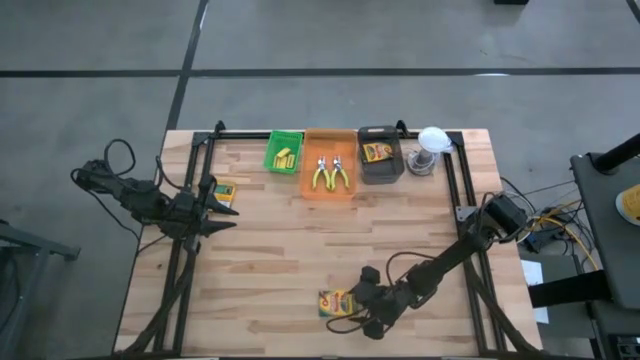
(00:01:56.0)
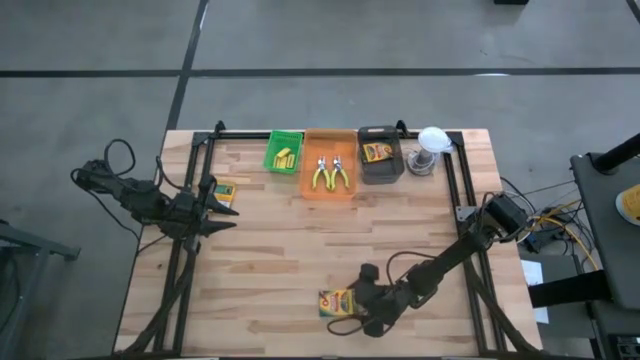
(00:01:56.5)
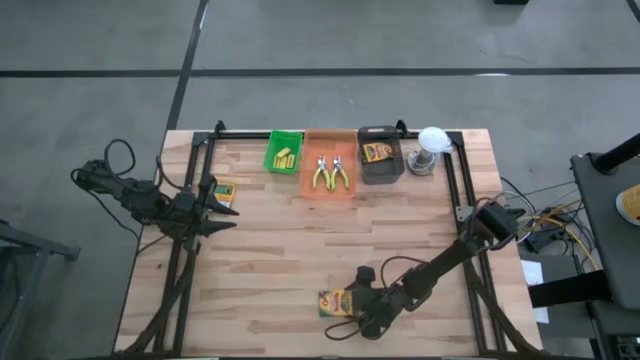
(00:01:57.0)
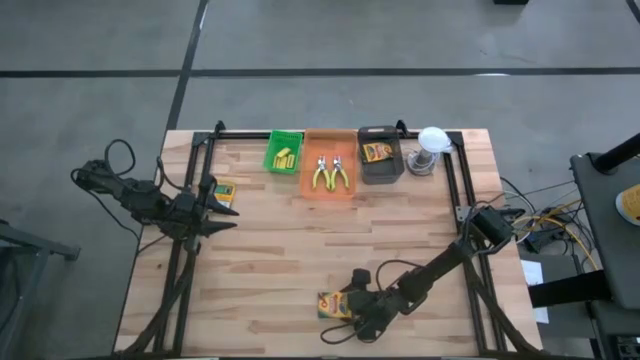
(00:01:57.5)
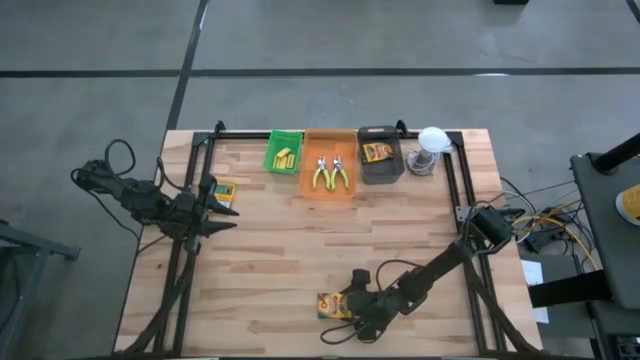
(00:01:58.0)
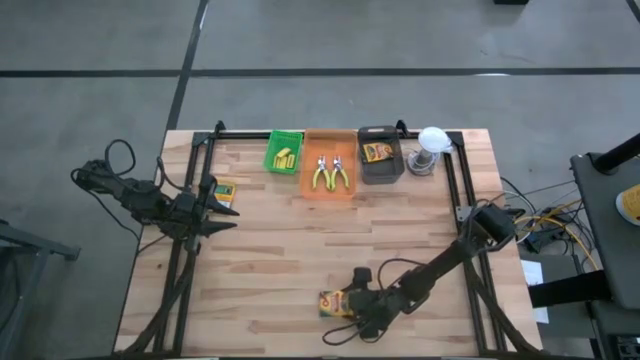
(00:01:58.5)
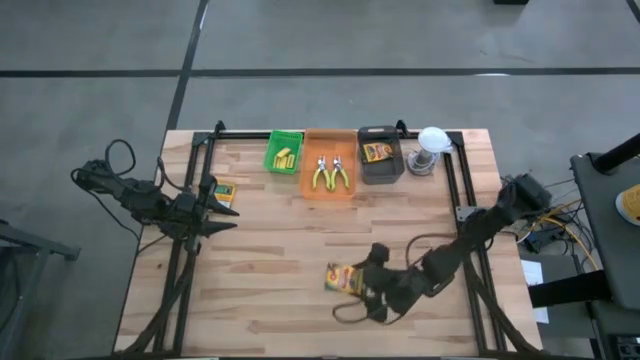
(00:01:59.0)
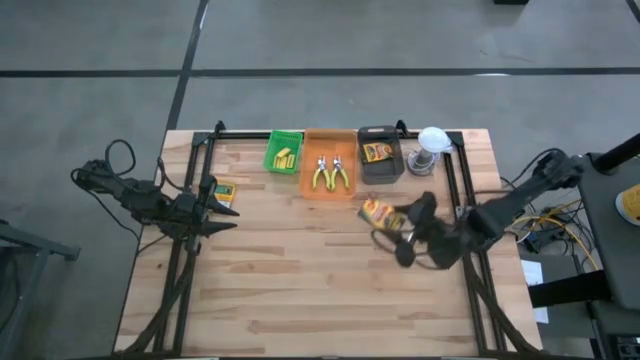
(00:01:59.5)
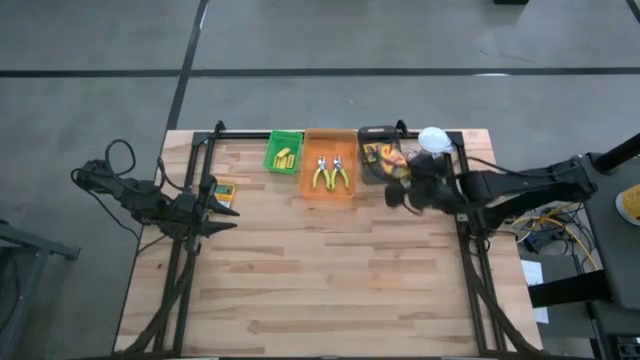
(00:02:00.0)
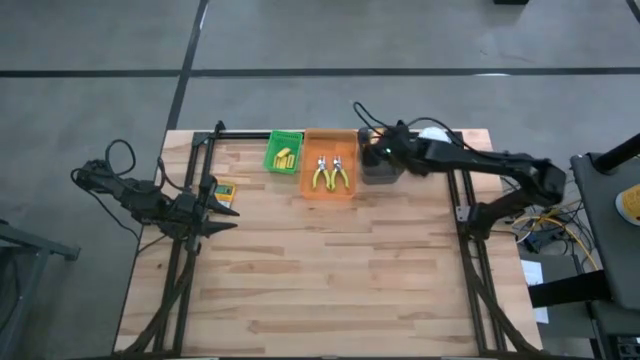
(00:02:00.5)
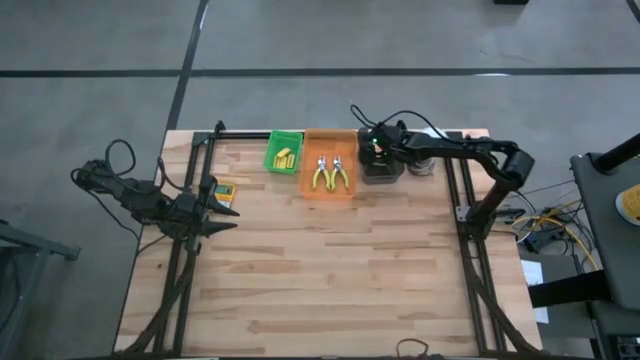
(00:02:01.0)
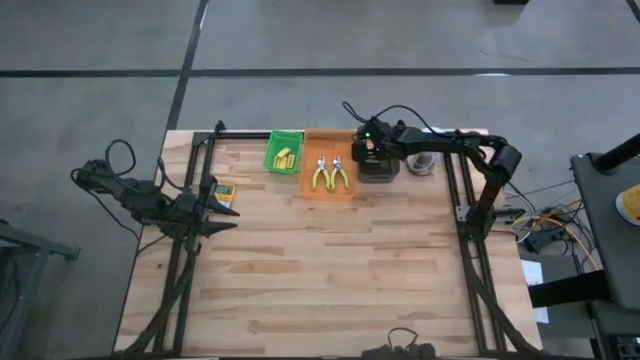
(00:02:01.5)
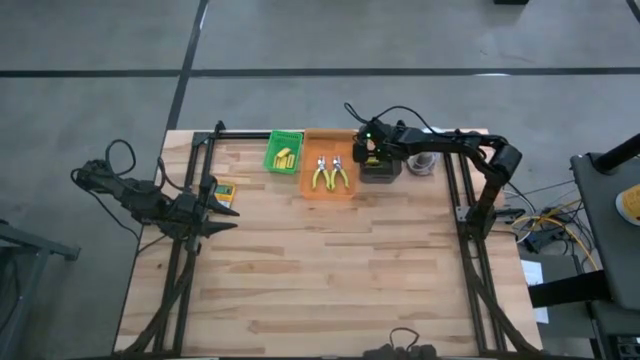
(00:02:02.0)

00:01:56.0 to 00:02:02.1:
Task: Pick & Place School Supplies
Put the yellow crayon box into the black bin

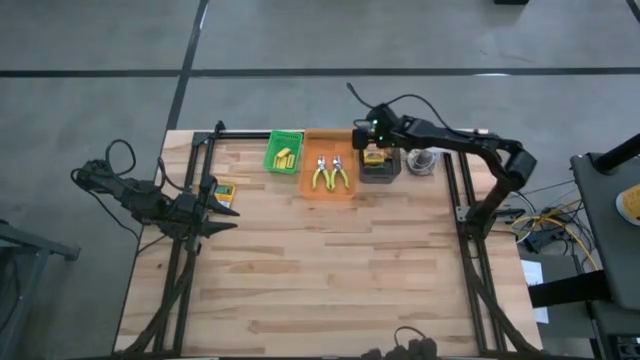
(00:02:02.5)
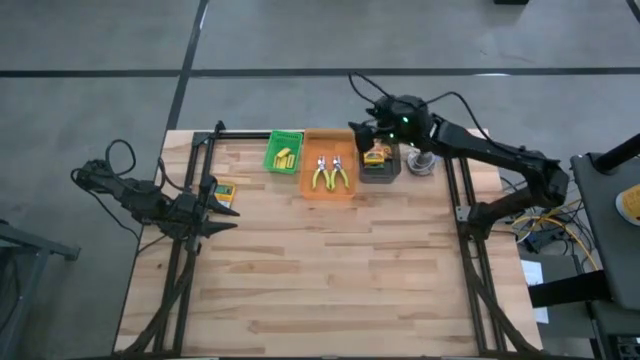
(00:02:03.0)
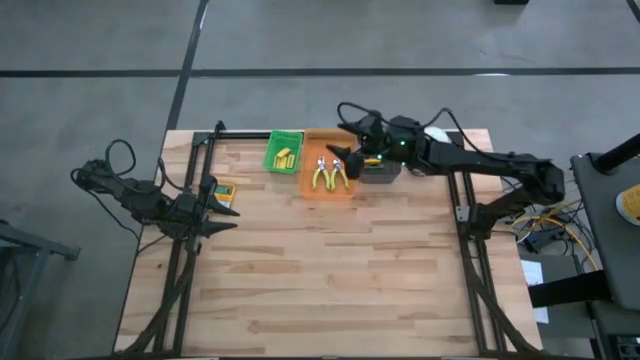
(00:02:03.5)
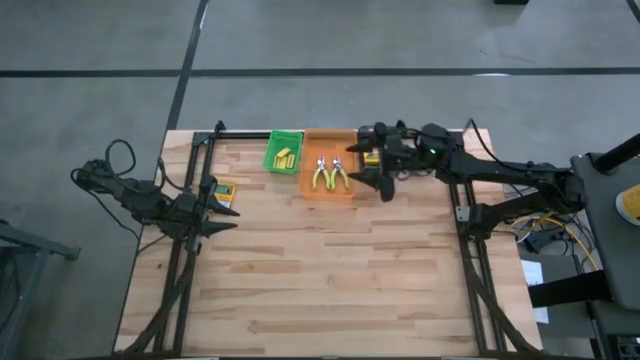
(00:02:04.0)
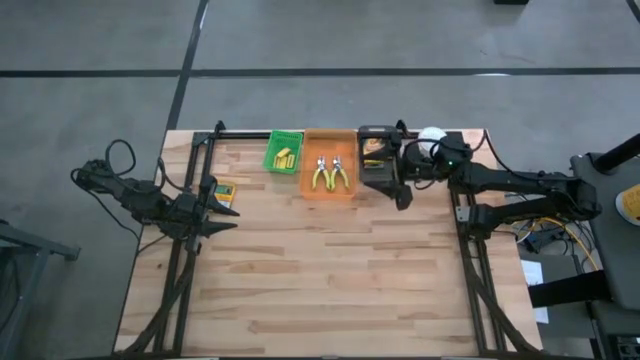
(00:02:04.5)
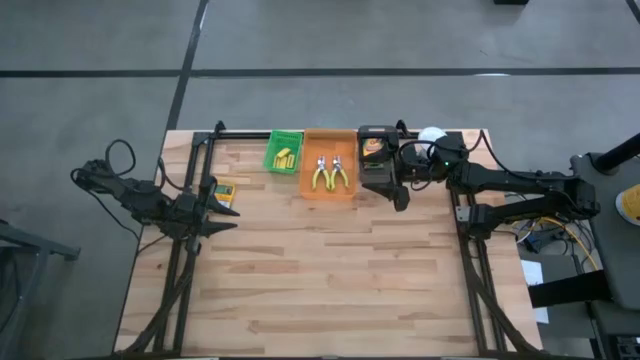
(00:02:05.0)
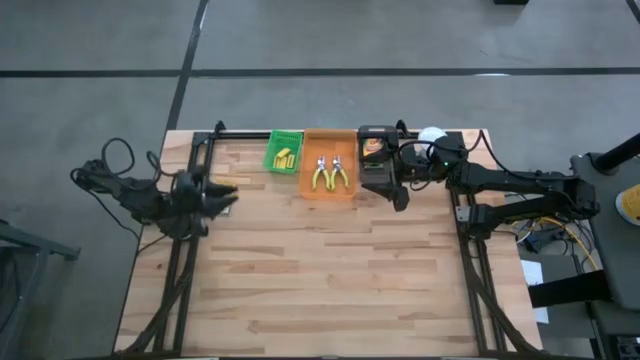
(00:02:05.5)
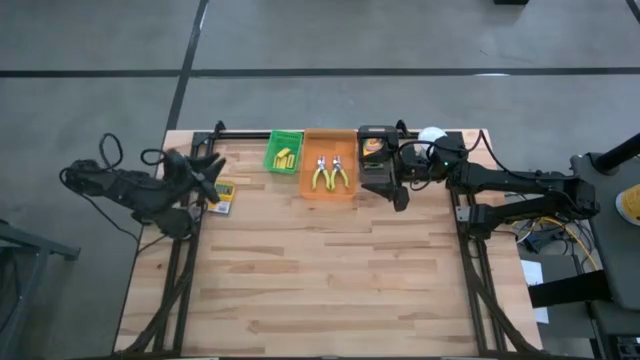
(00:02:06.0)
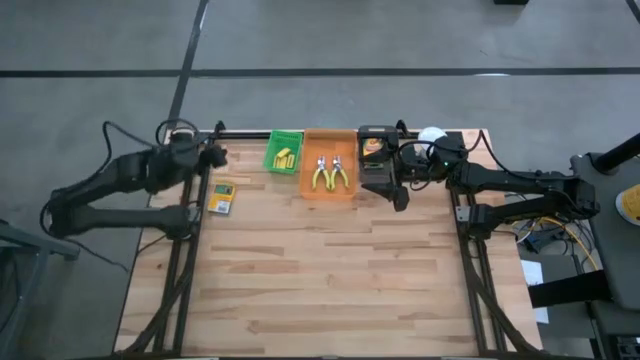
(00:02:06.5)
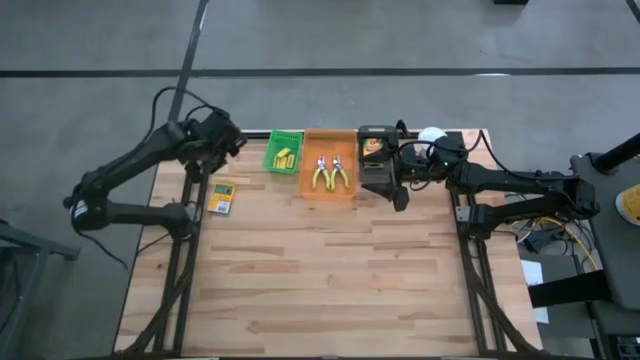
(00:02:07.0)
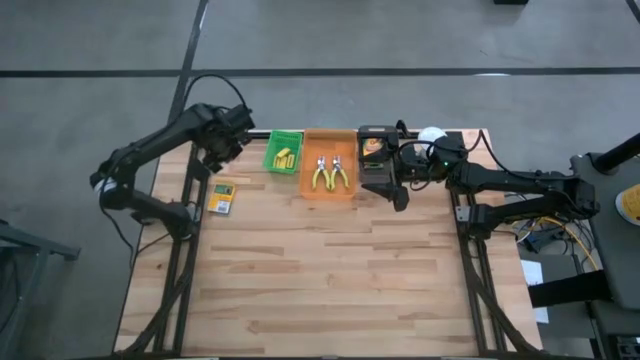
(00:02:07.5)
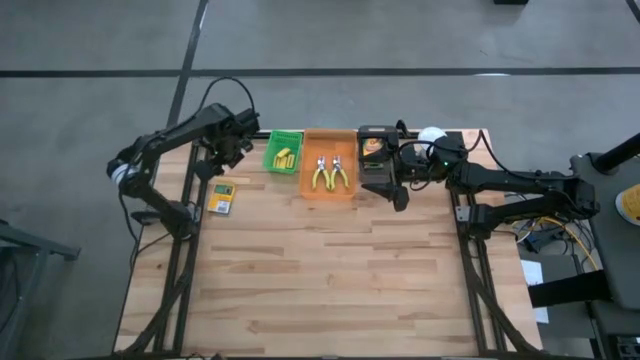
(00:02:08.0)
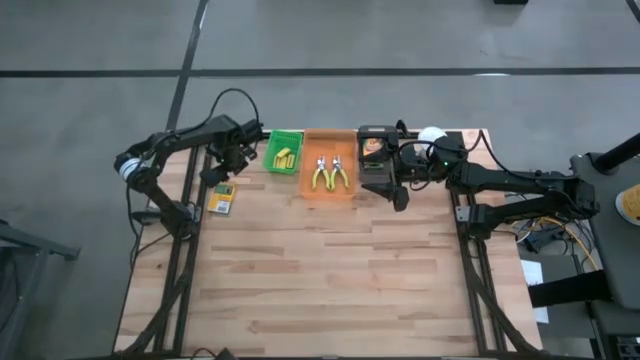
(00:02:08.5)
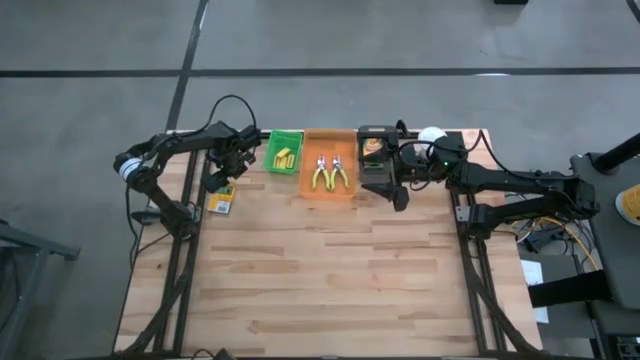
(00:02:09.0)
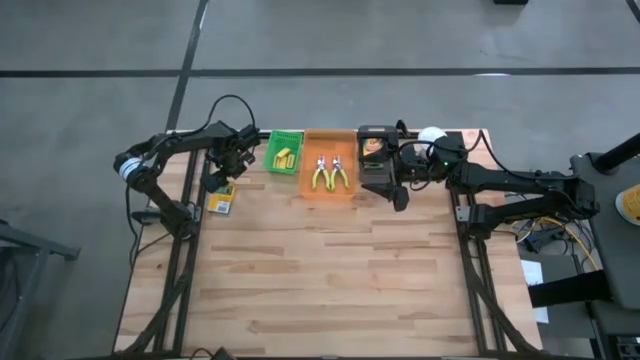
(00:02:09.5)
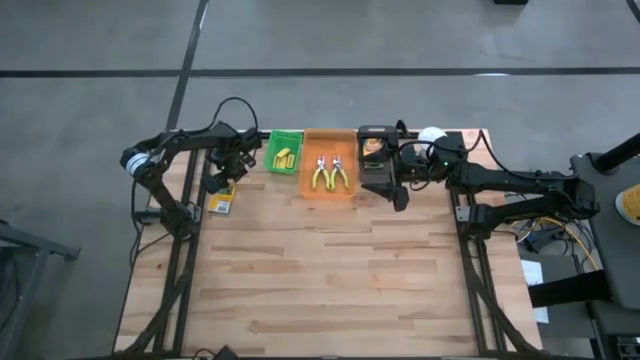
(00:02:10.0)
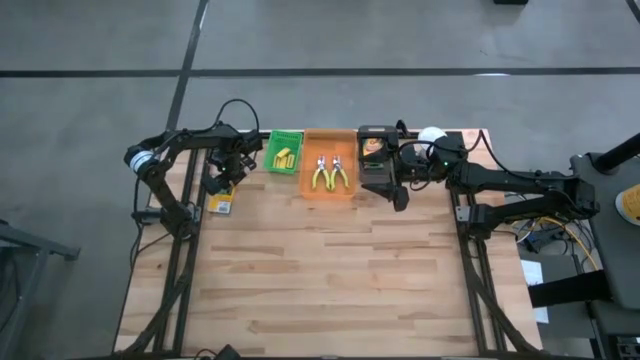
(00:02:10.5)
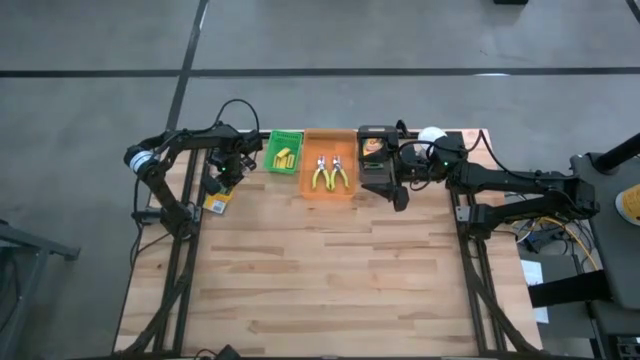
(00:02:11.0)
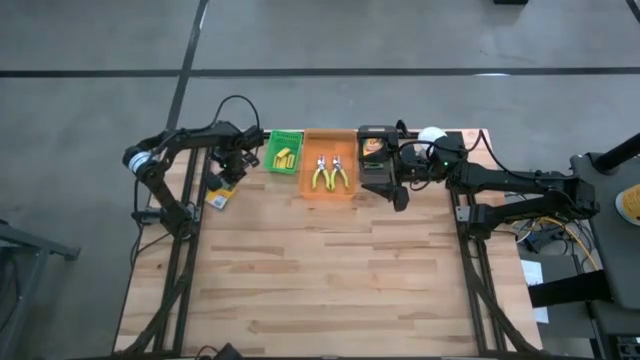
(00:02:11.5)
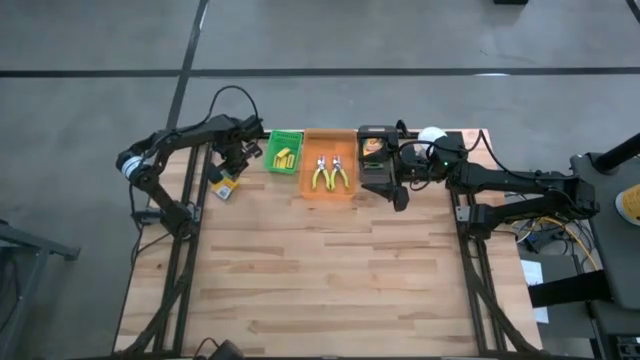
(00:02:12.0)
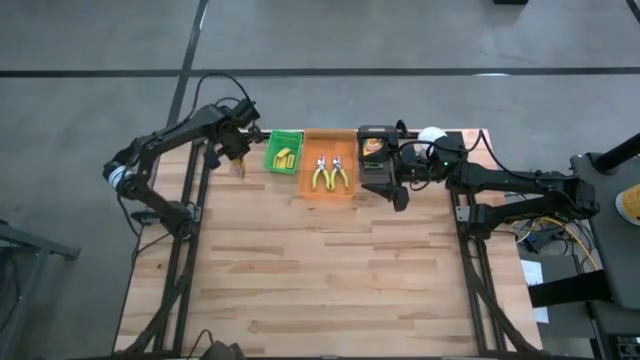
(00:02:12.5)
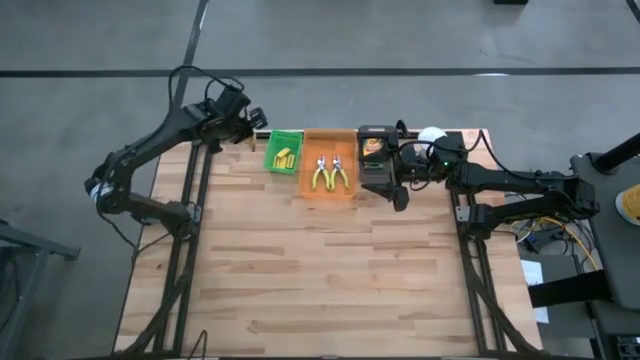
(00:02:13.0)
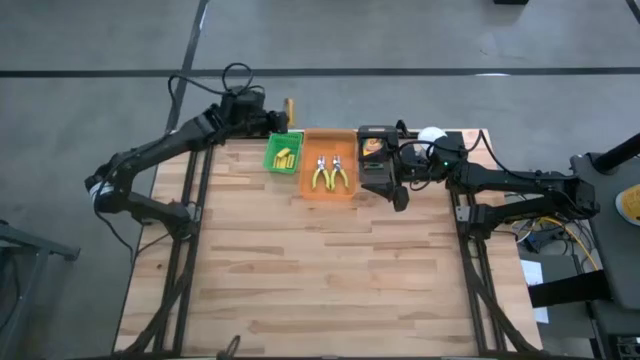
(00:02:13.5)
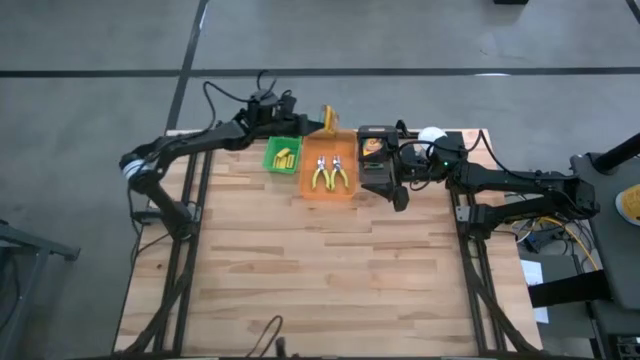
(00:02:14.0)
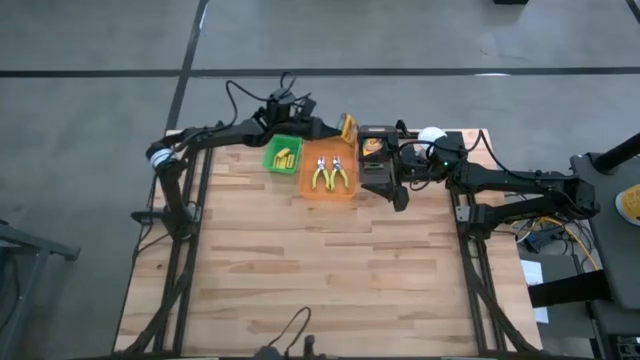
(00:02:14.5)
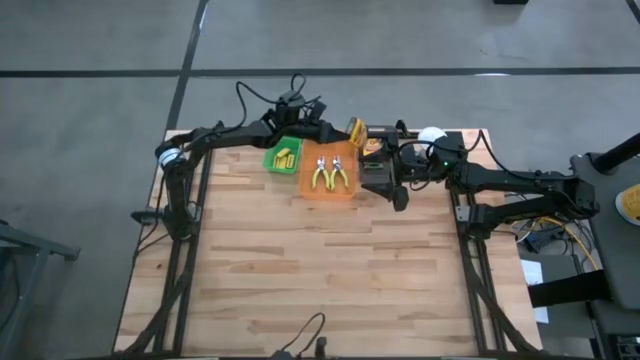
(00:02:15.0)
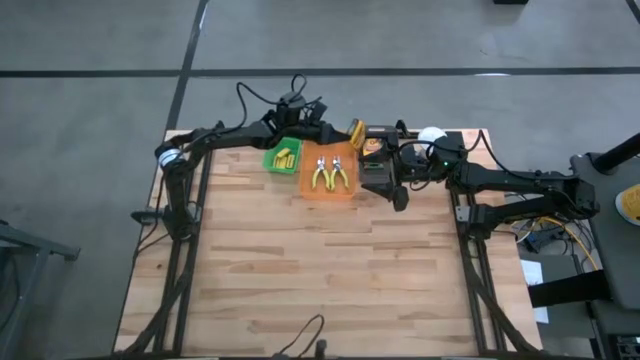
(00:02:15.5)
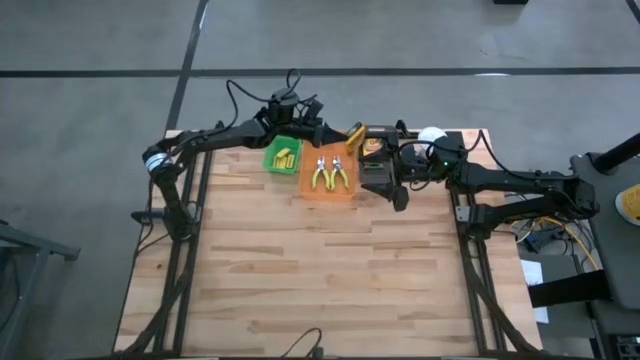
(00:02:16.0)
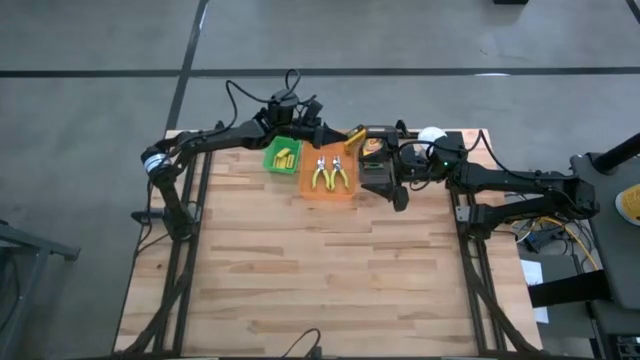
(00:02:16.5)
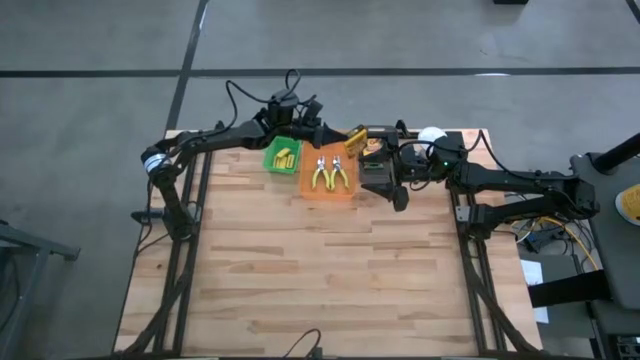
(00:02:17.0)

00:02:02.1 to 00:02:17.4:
Put the yellow crayon box into the black bin
